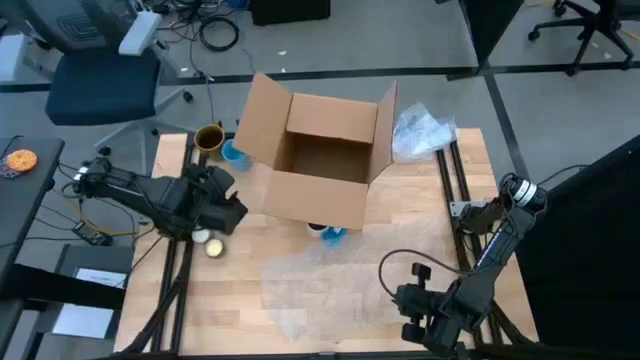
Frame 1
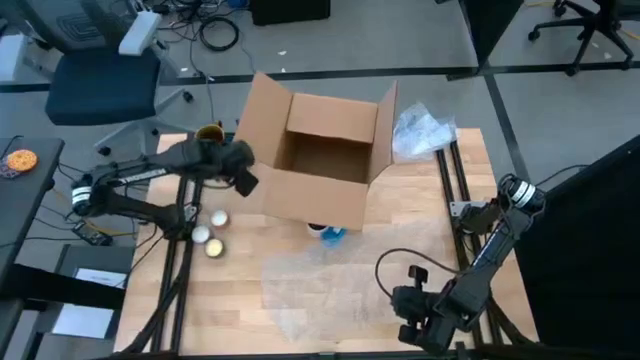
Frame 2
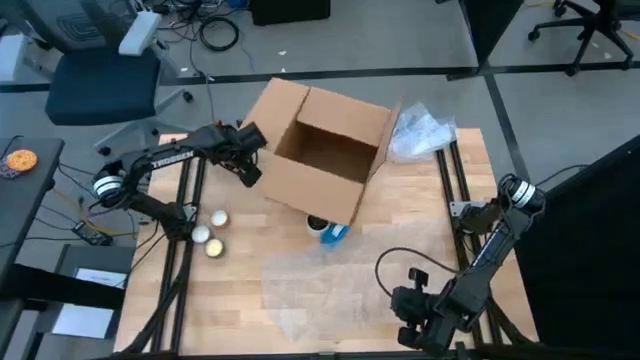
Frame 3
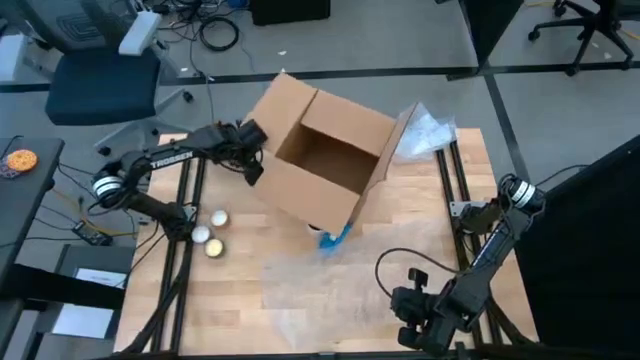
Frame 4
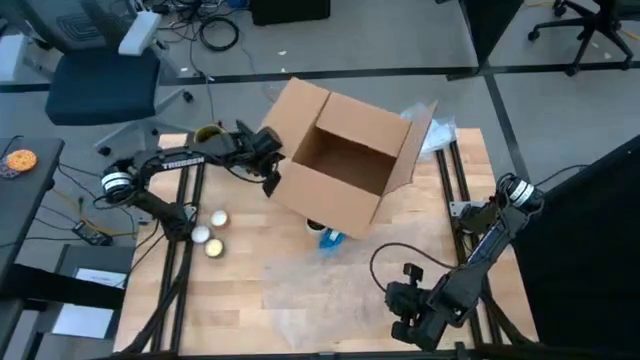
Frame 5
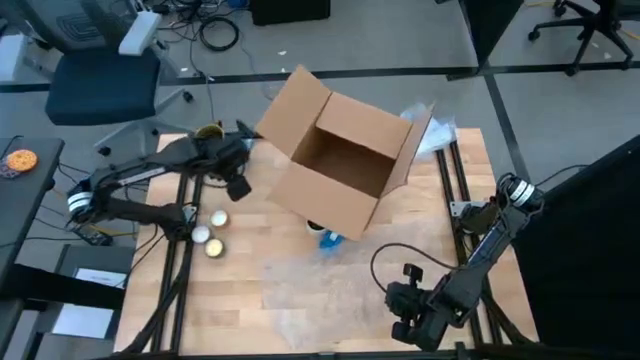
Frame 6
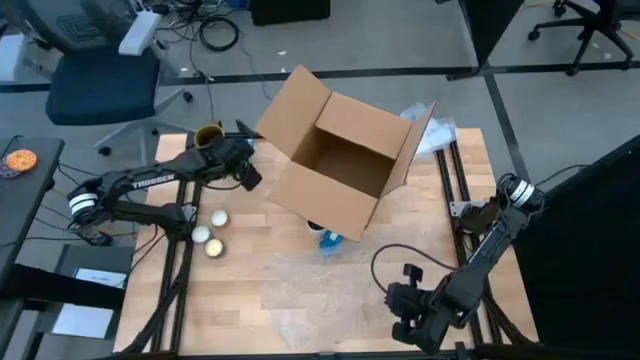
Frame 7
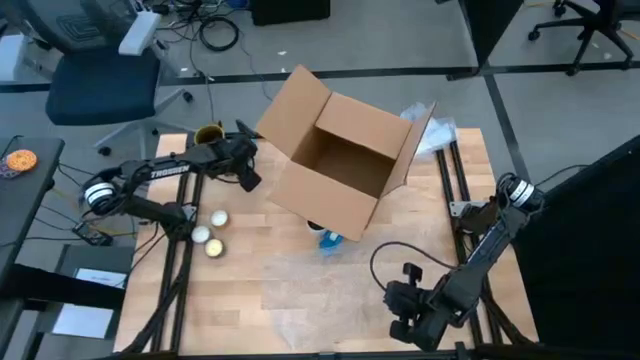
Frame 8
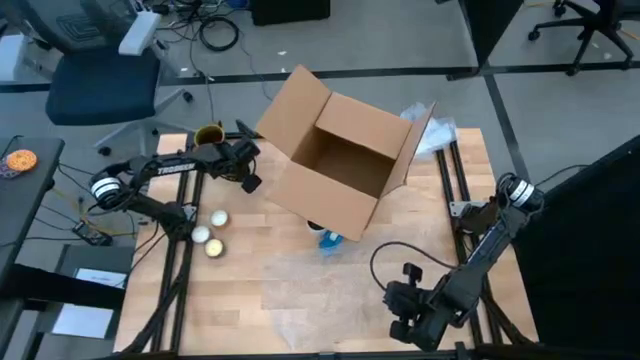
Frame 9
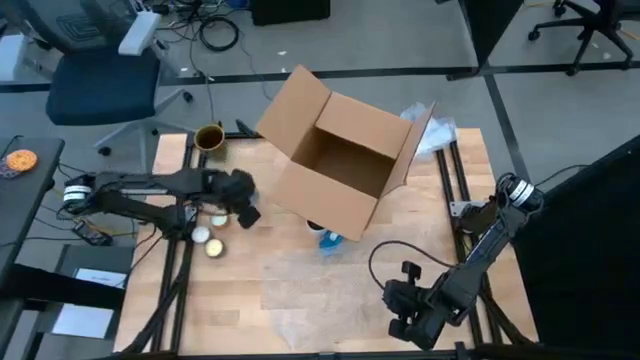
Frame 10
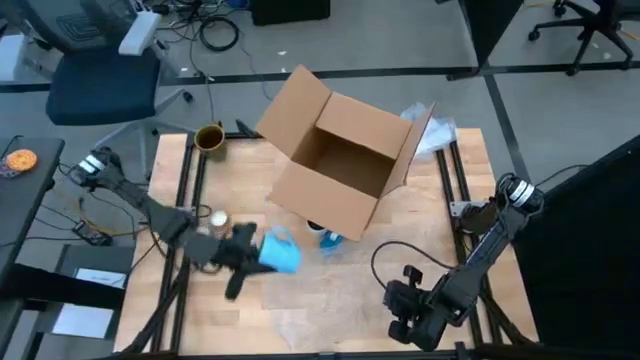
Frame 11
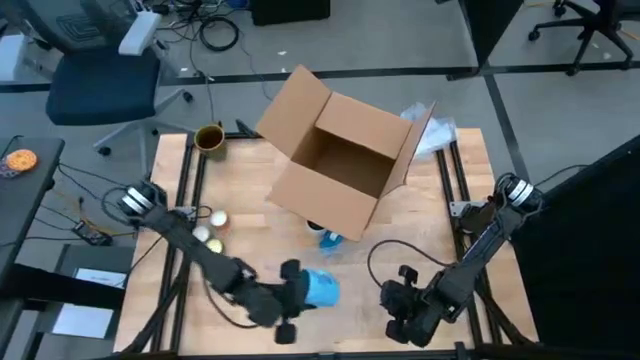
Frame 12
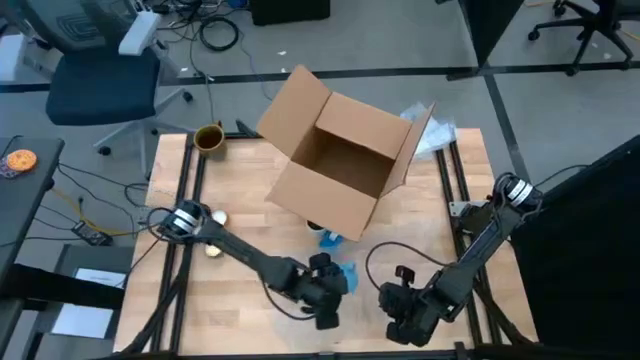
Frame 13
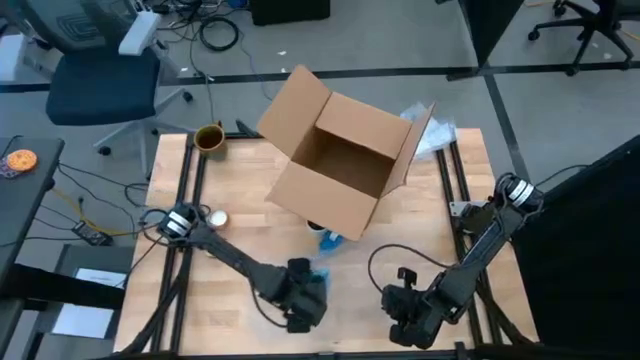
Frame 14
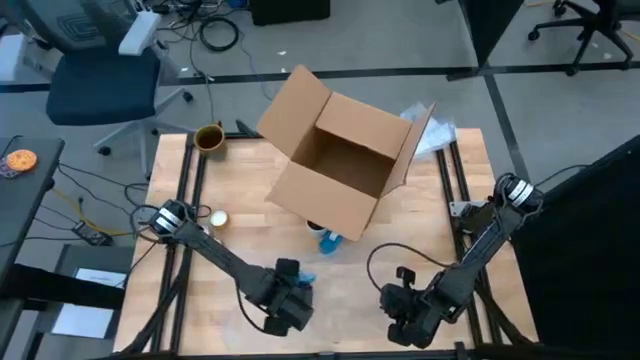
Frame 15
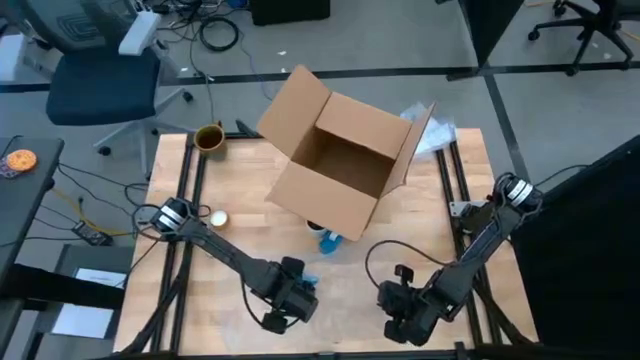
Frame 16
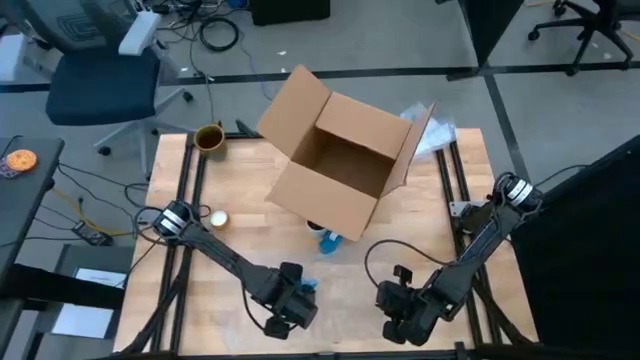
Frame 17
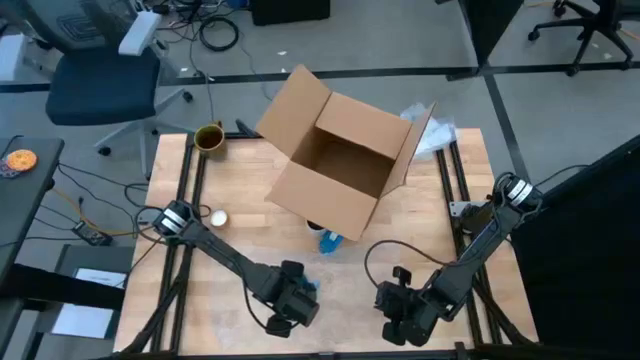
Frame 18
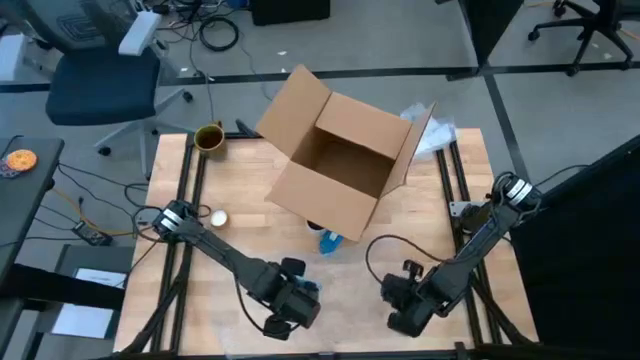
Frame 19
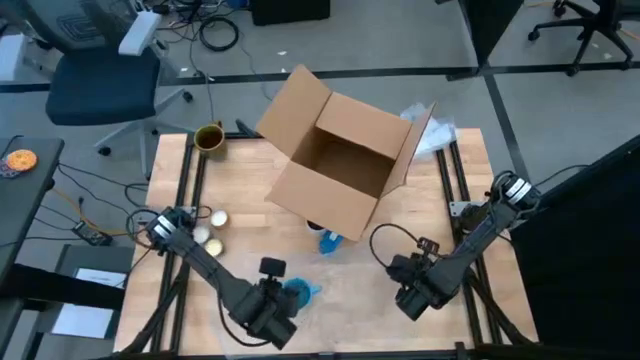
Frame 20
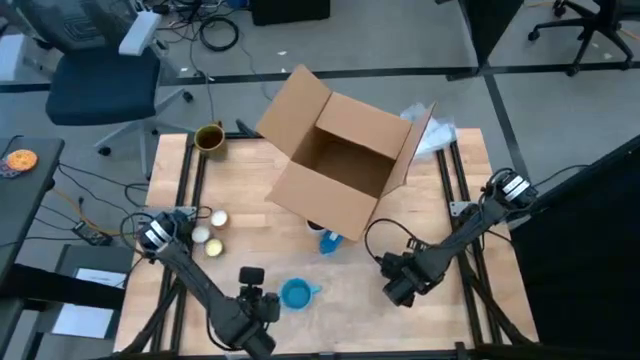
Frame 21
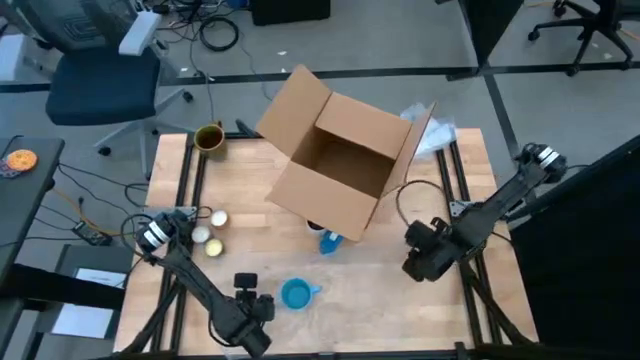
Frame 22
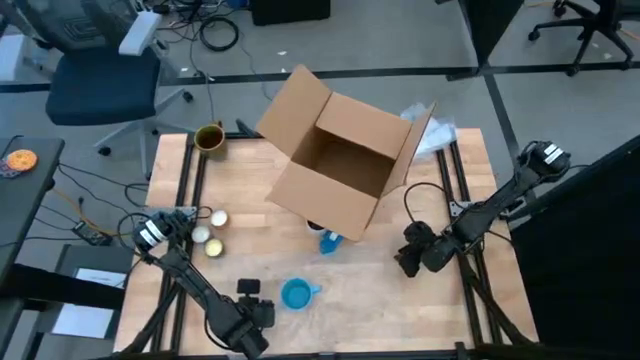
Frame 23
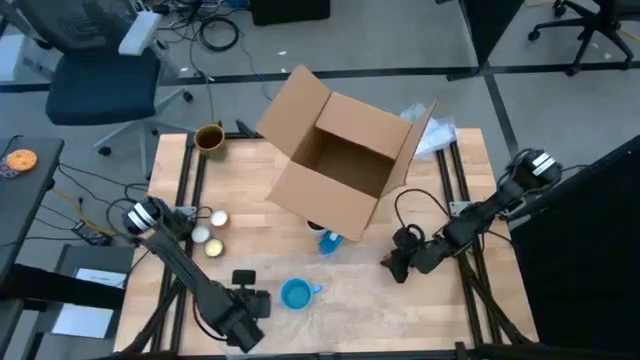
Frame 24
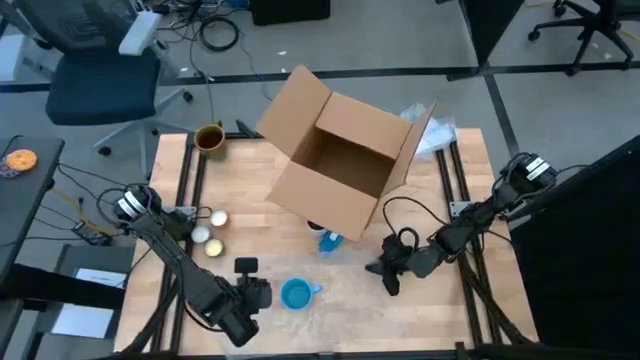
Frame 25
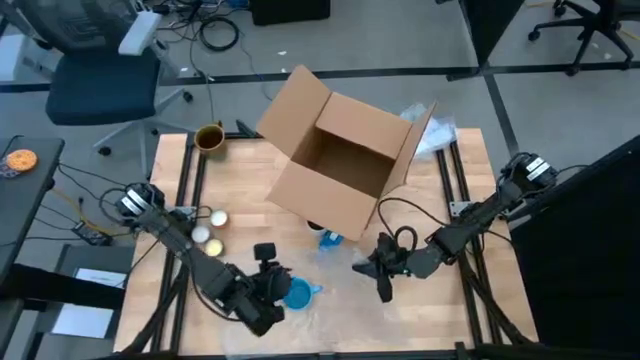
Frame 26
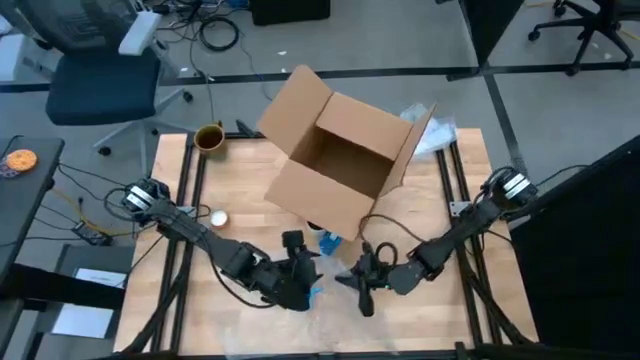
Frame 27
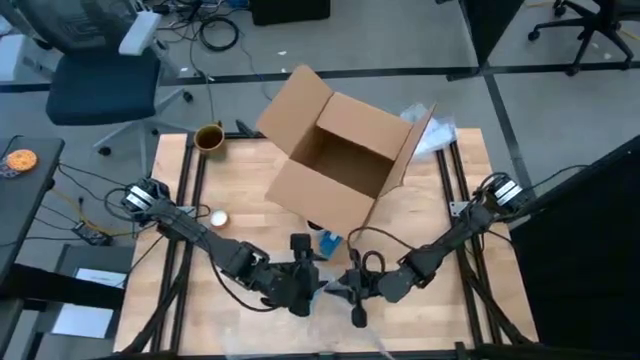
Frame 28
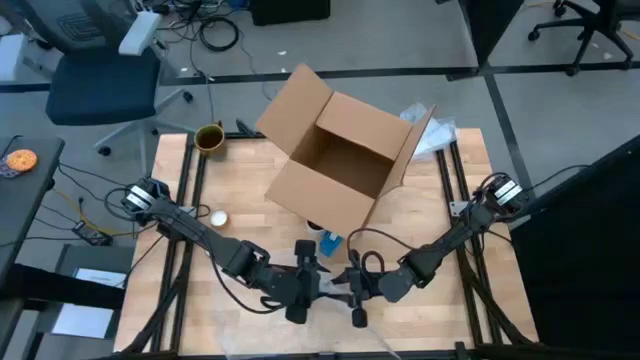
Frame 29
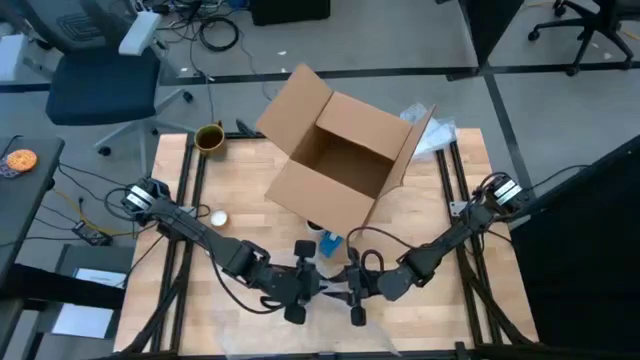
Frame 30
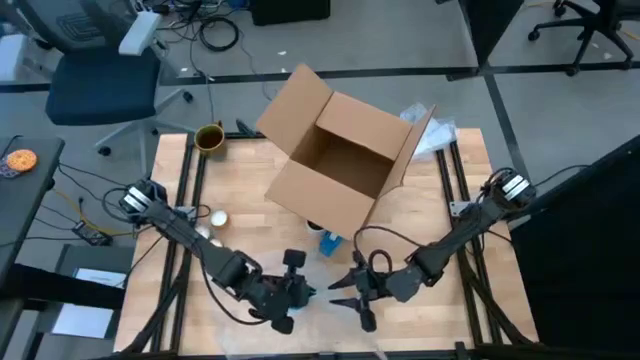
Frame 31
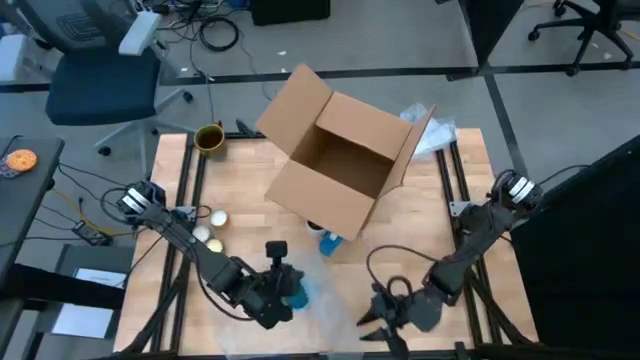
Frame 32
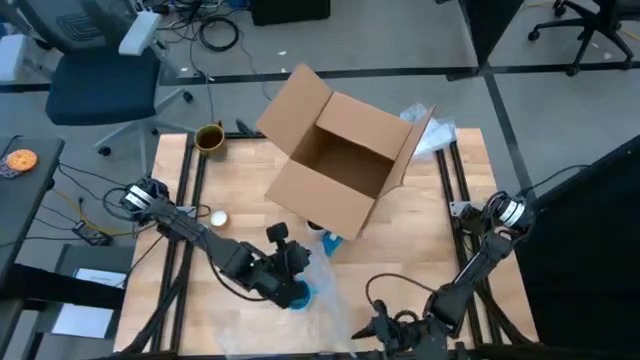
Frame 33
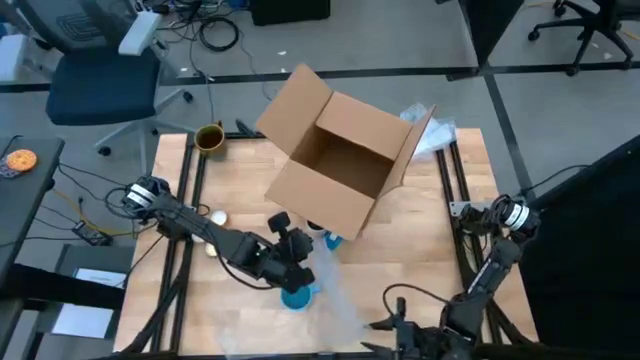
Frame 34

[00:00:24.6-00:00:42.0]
Task: wrap mug
Wrap the blue mug with the bubble wrap on the table
